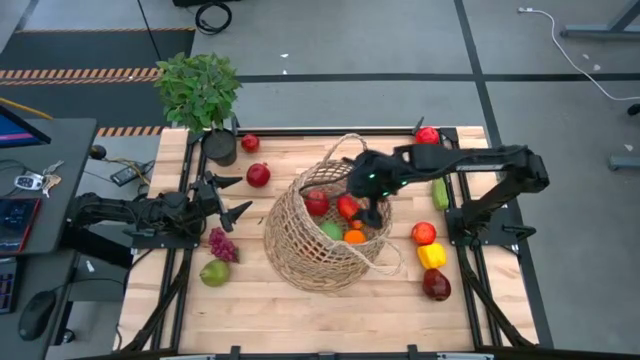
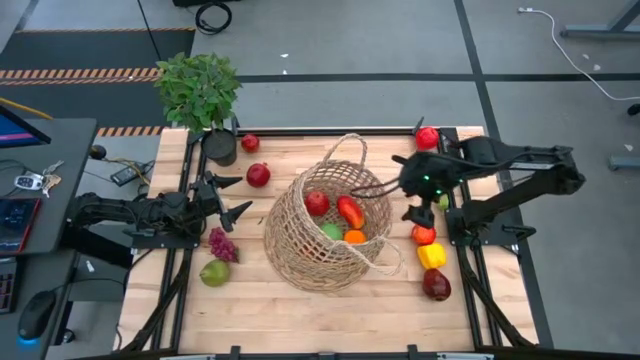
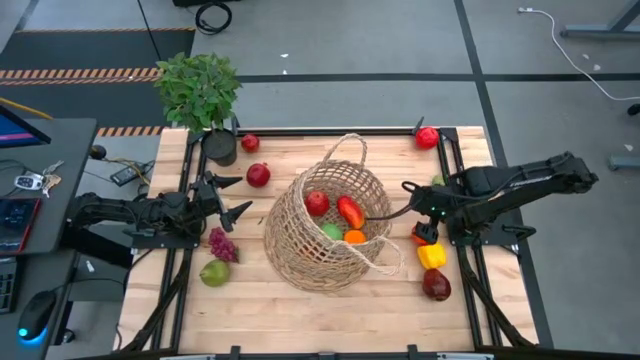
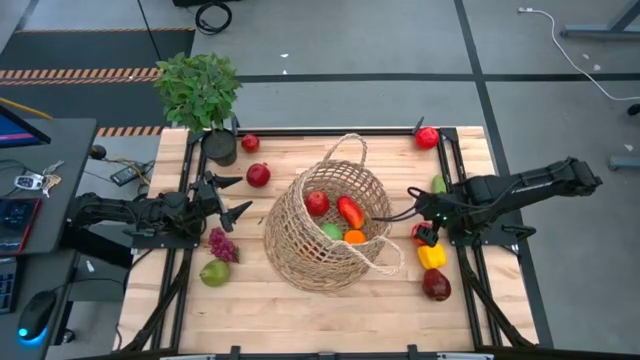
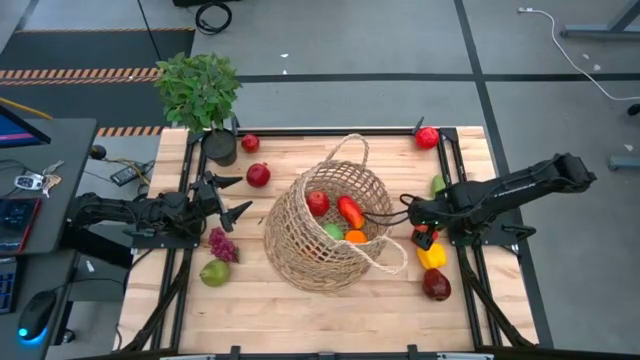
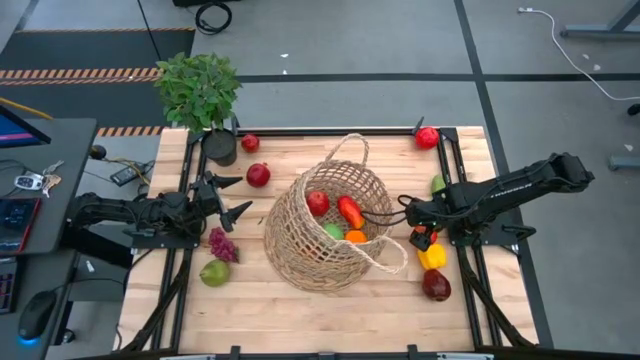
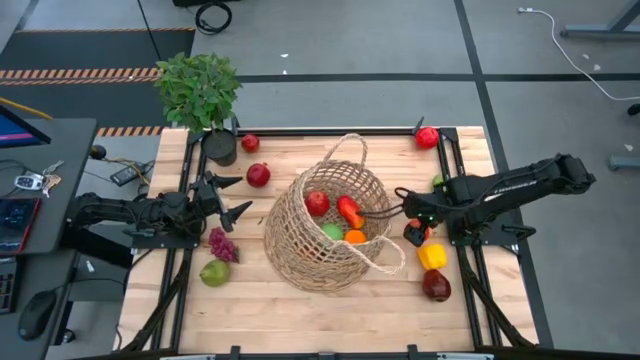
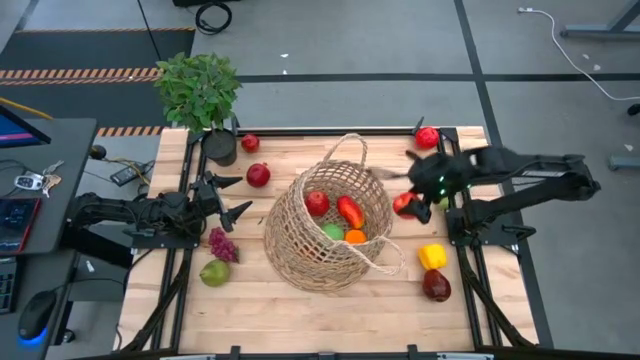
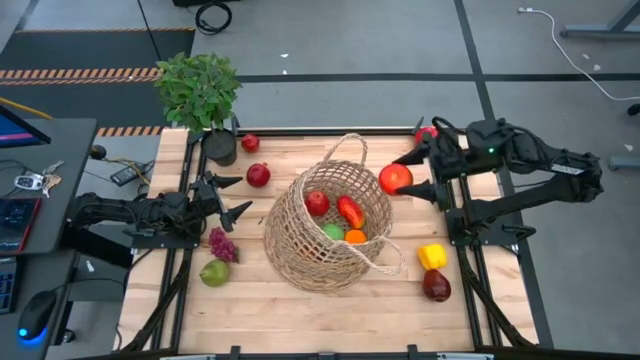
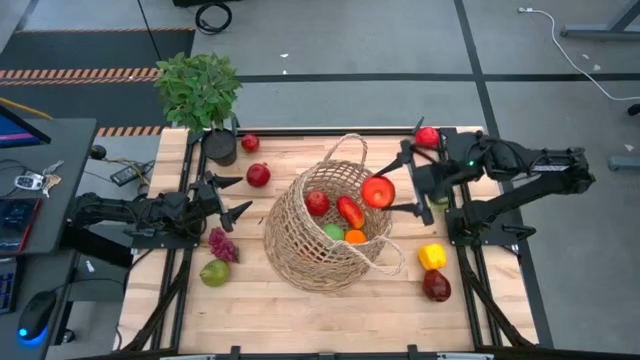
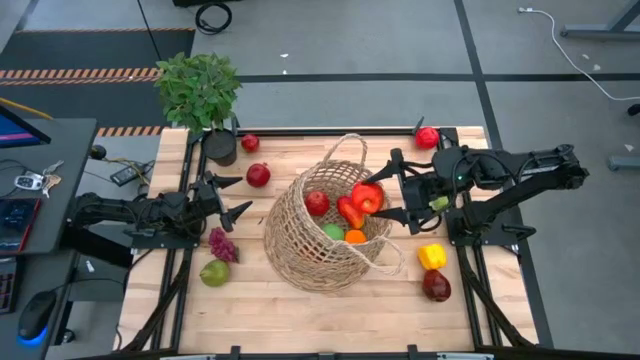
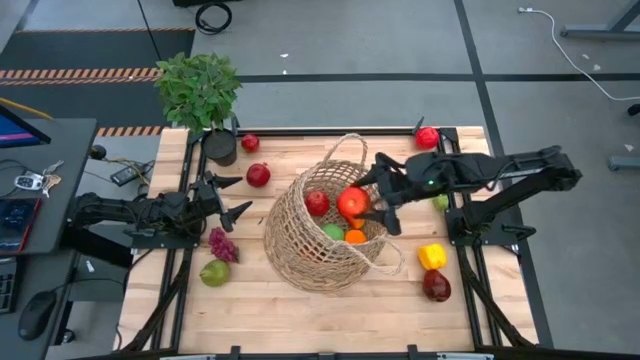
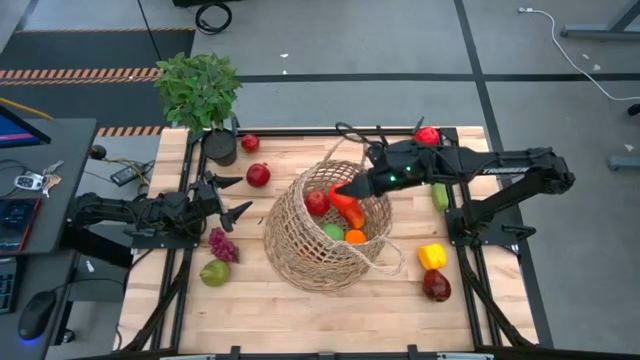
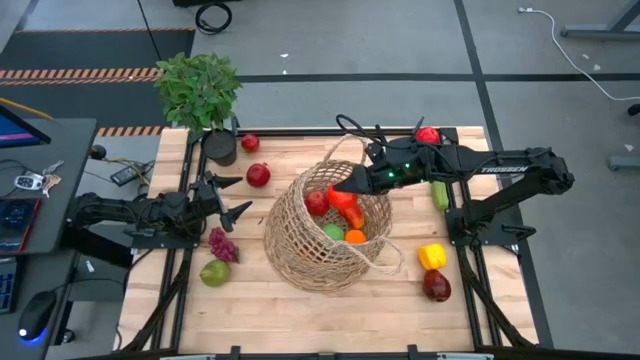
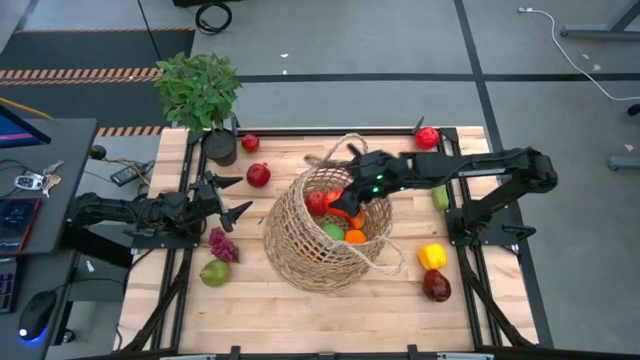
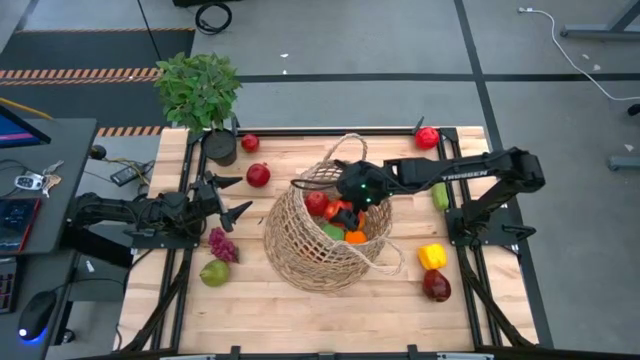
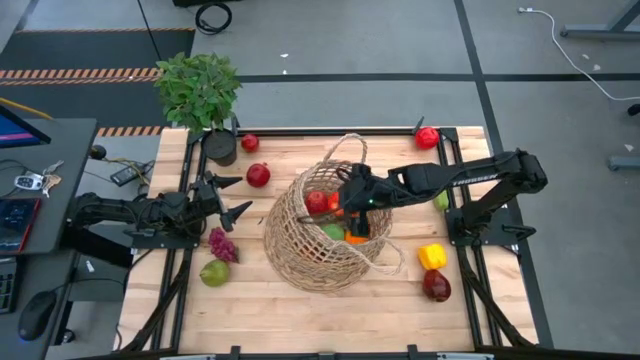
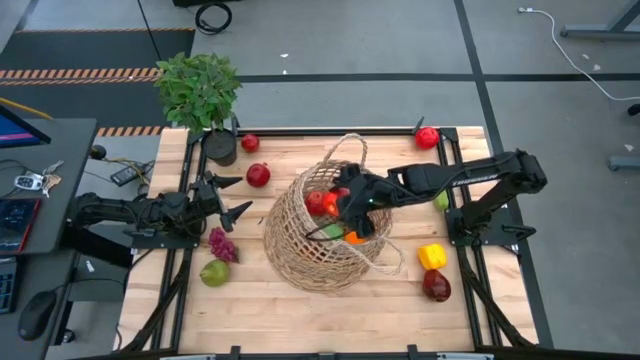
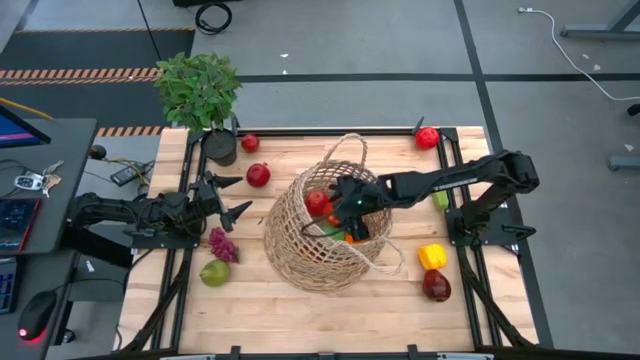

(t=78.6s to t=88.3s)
Task: Build produce basket
Put the red apple into the brown basket

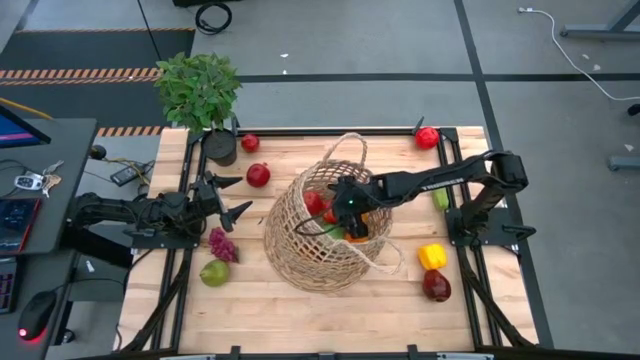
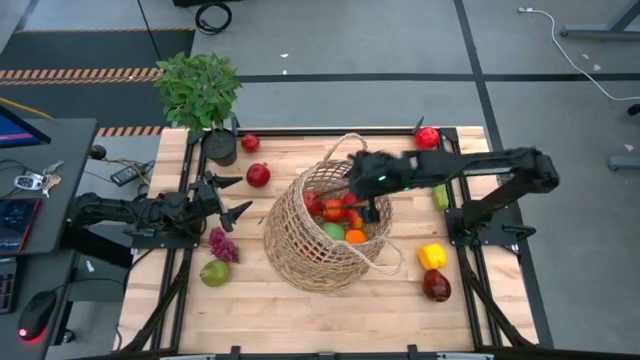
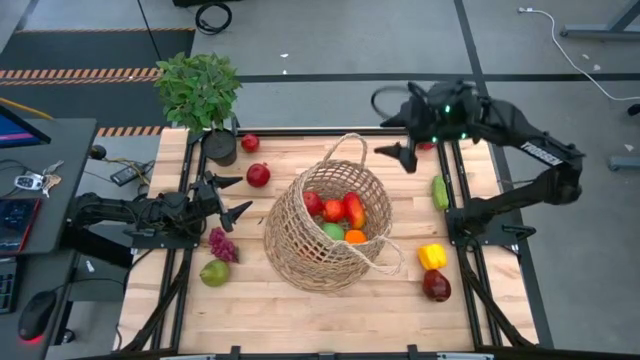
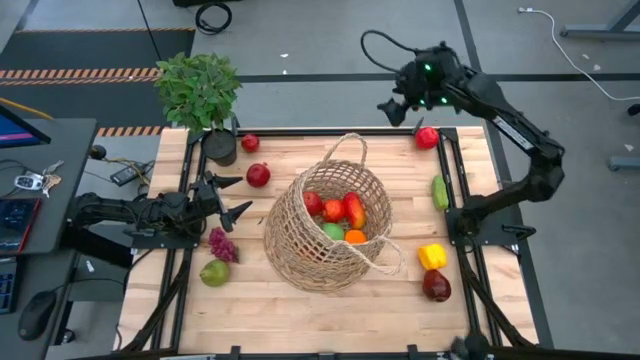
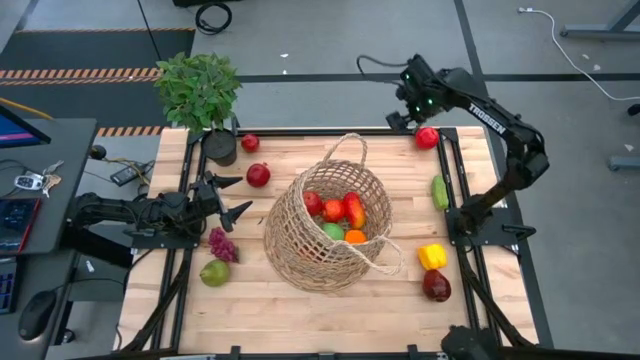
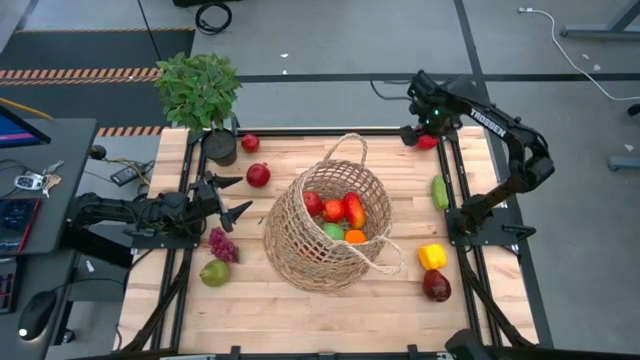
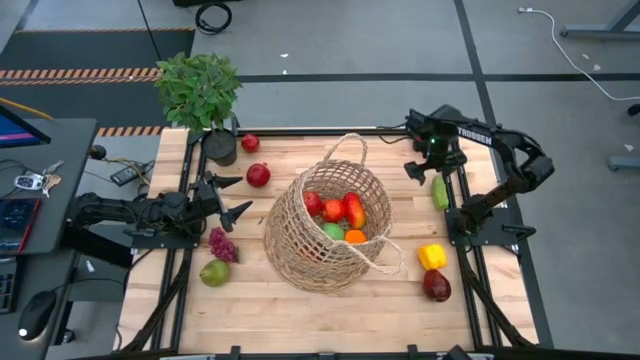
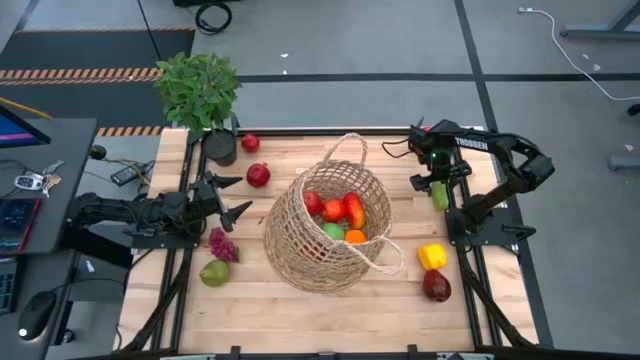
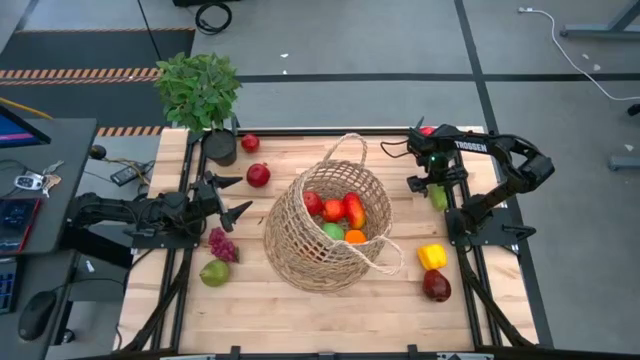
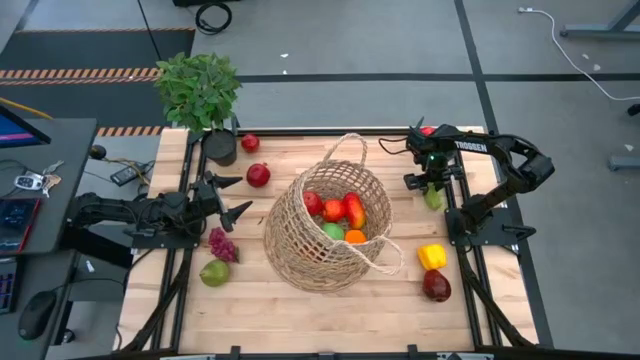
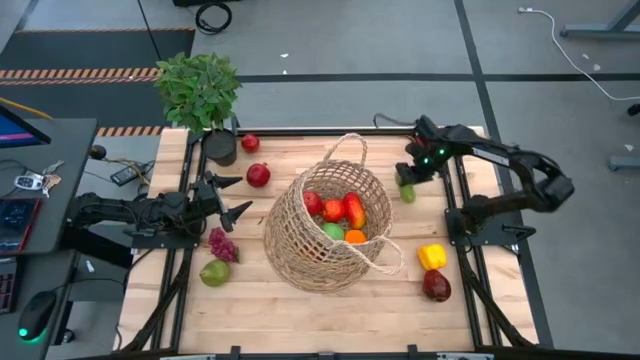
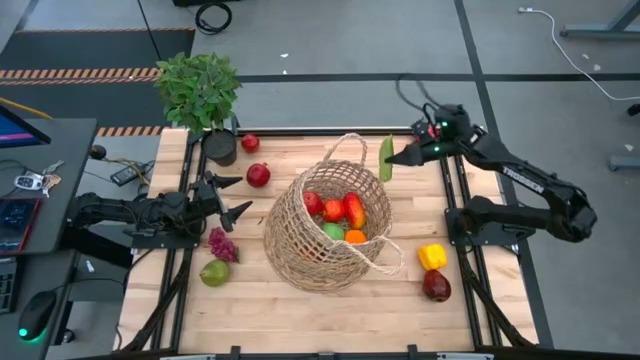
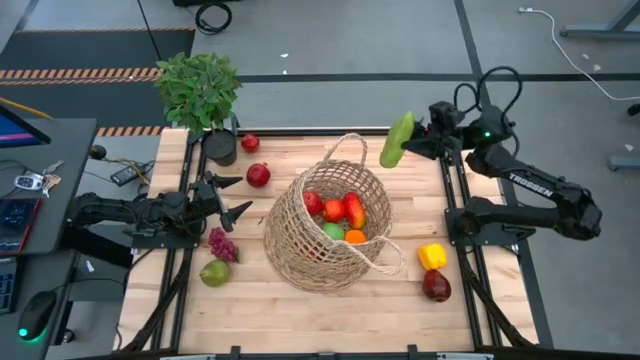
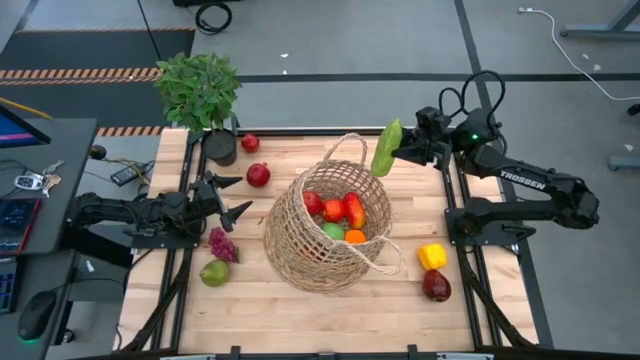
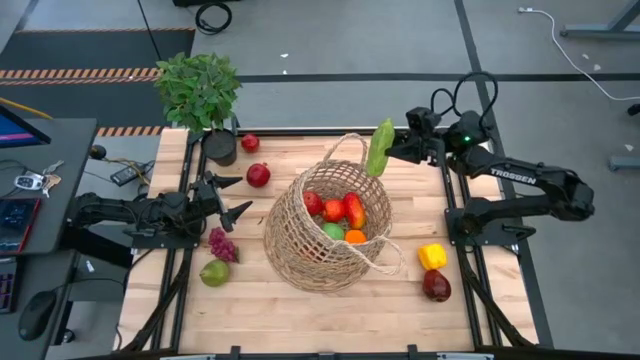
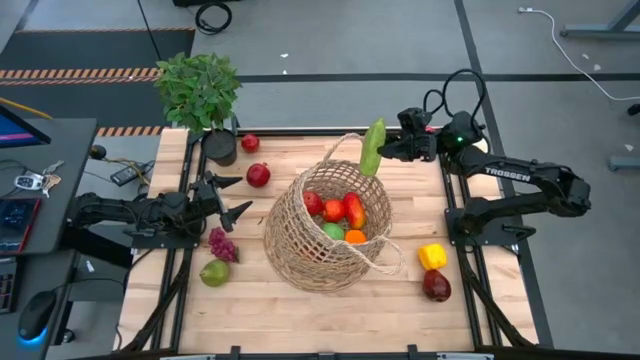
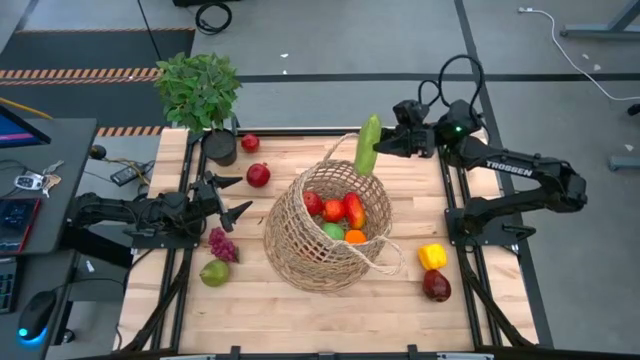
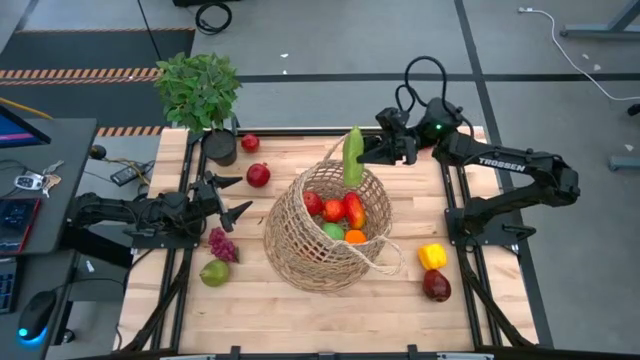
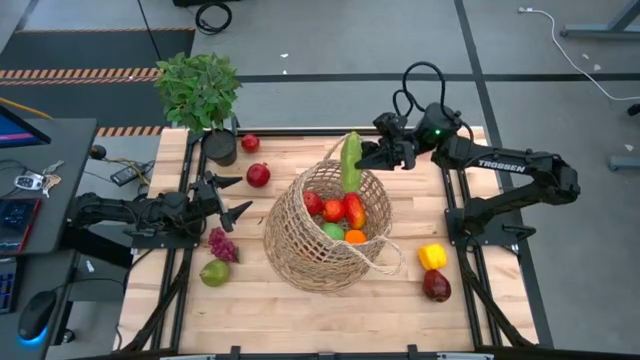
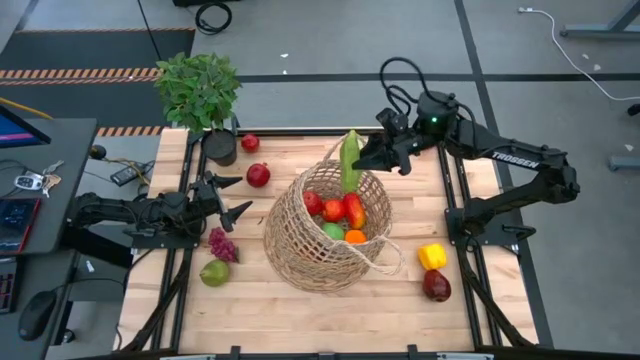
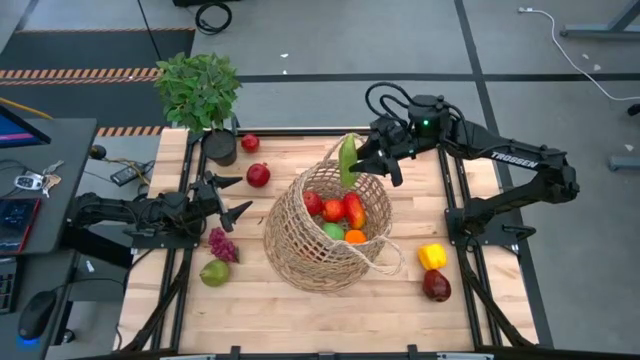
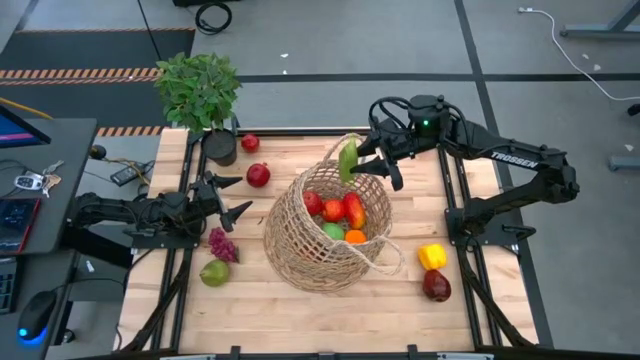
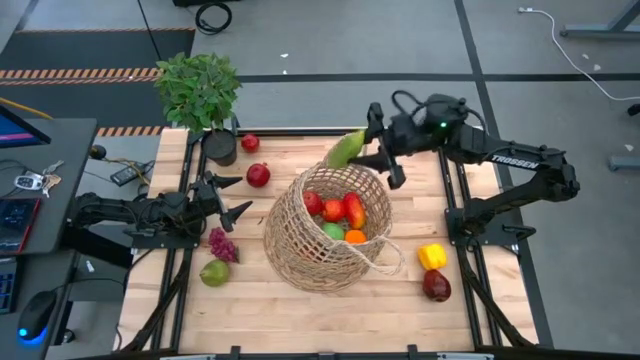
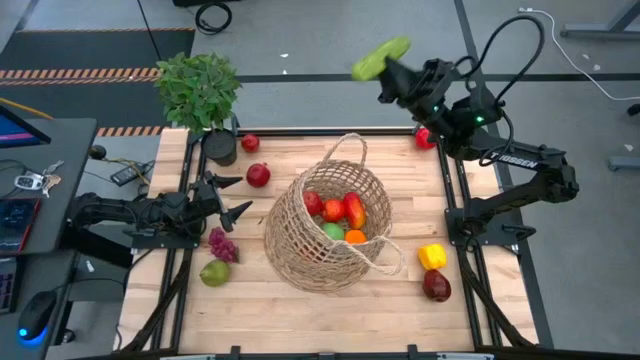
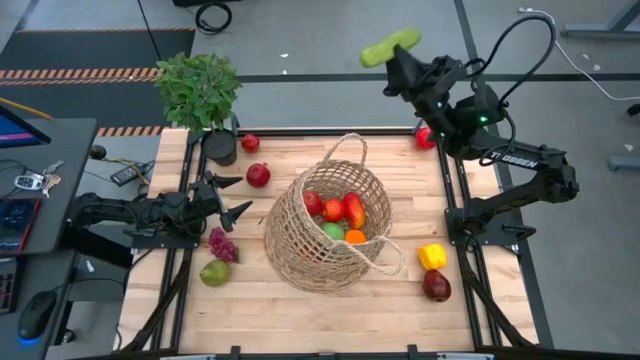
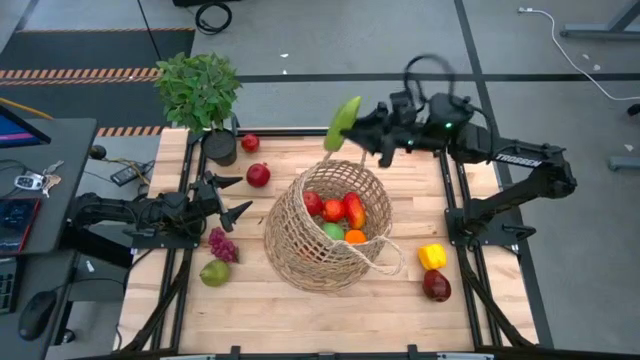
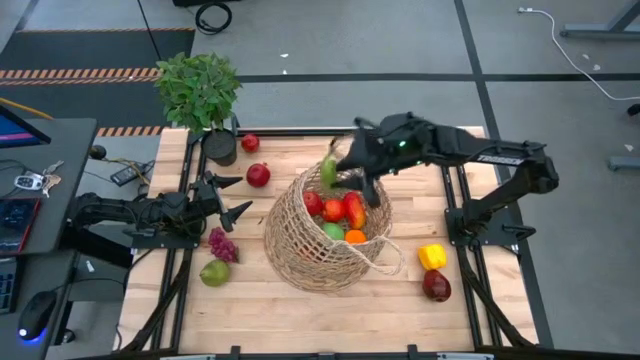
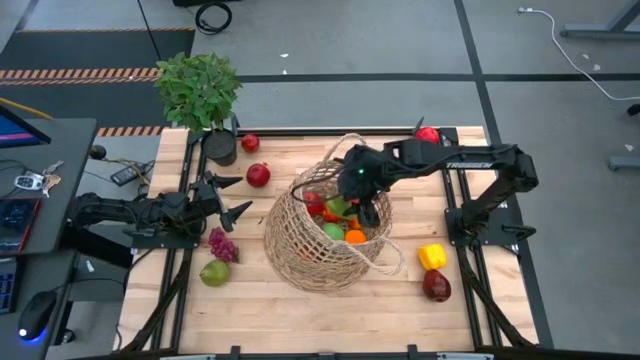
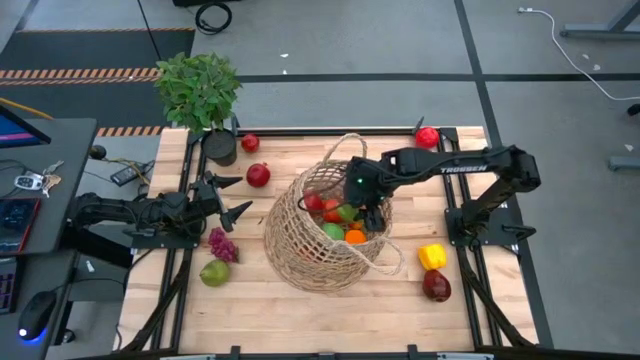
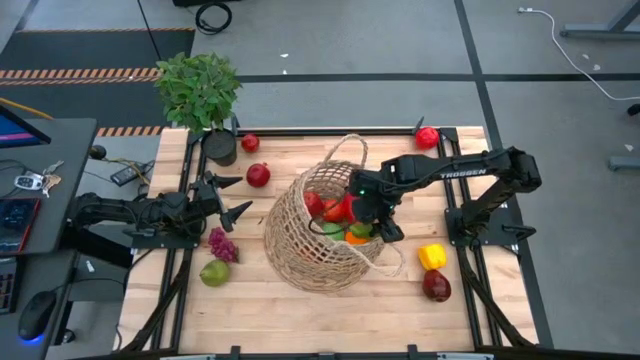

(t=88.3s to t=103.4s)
Put the green cucumber into the brown basket
